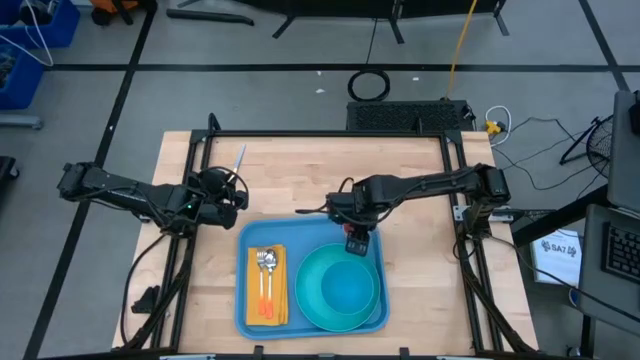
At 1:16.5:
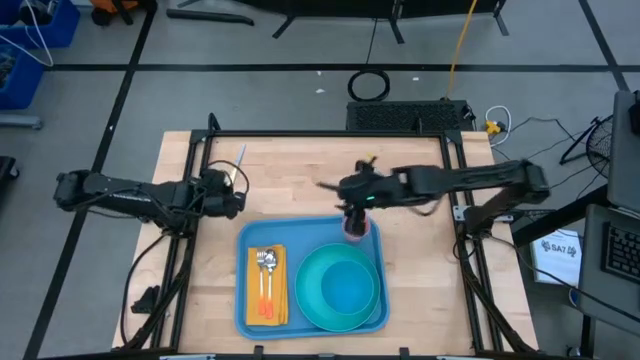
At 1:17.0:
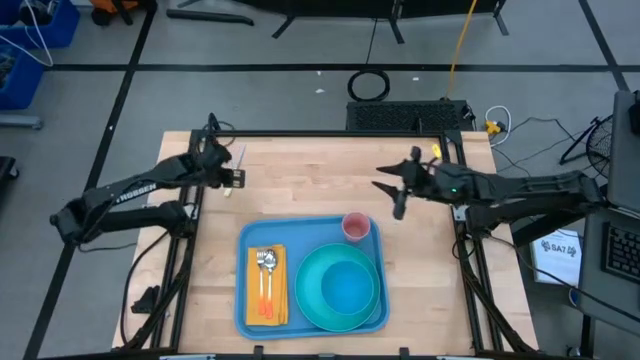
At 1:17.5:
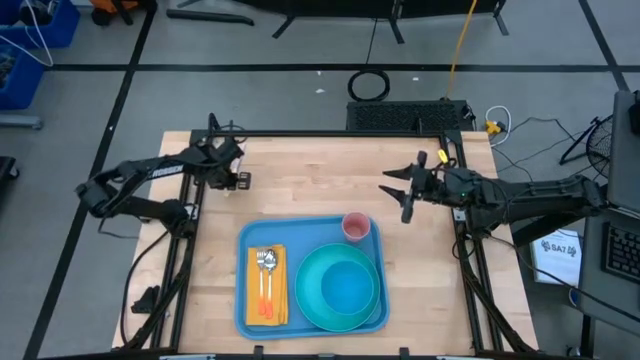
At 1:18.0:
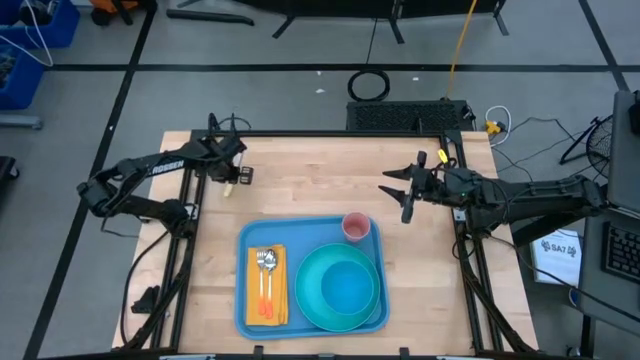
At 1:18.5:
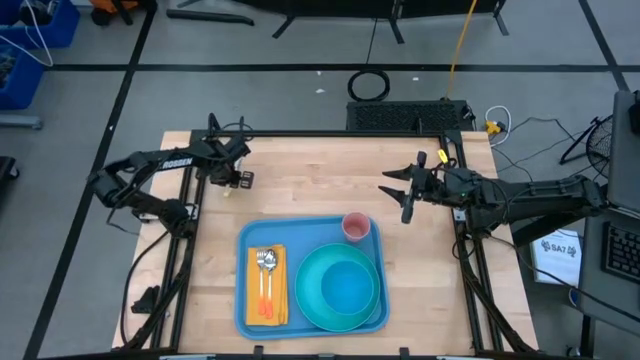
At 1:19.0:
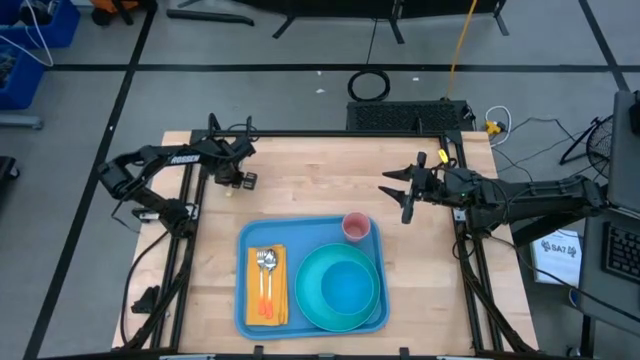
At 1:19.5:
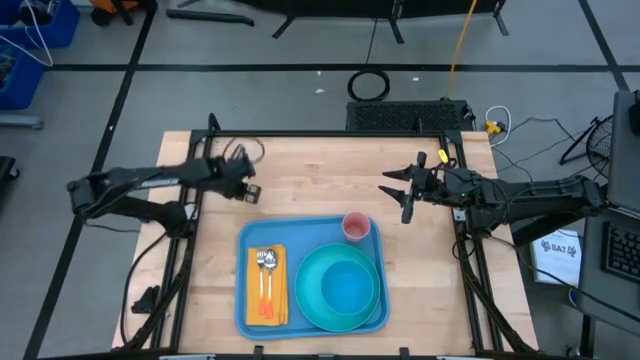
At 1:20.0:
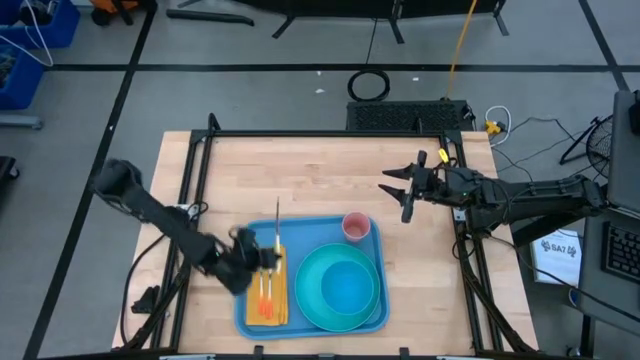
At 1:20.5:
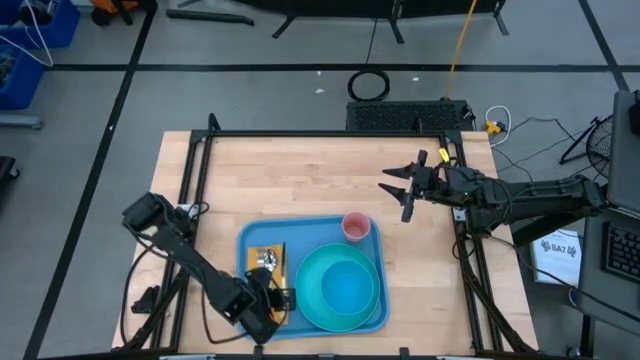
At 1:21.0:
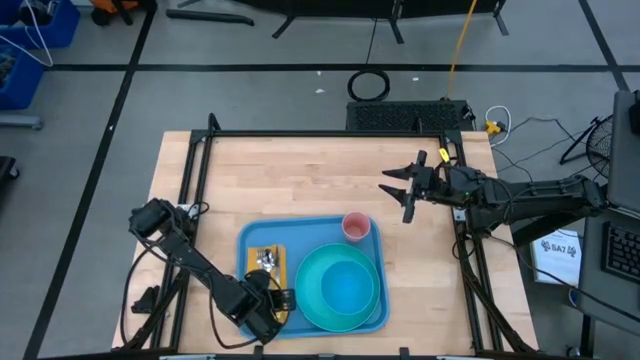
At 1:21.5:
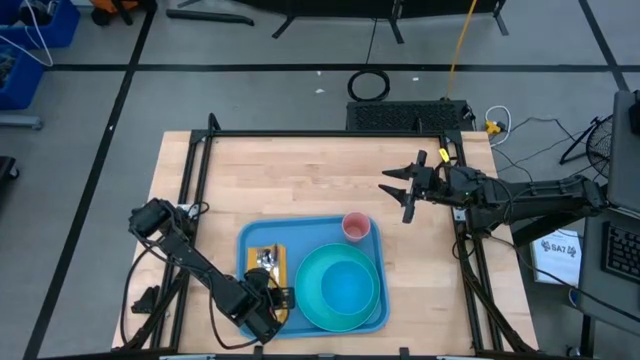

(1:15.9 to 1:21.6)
Task: Set up tray
Put the yellow knife on top of the yellow napkin to the right of the orange spoon

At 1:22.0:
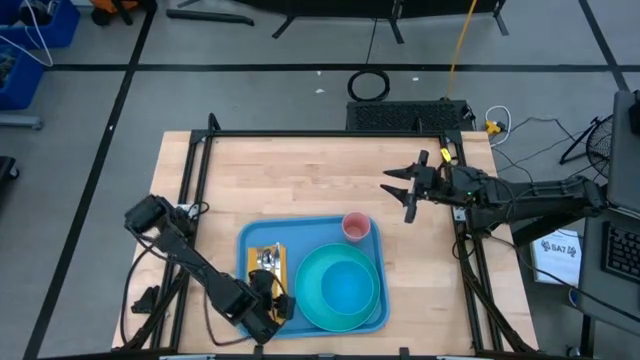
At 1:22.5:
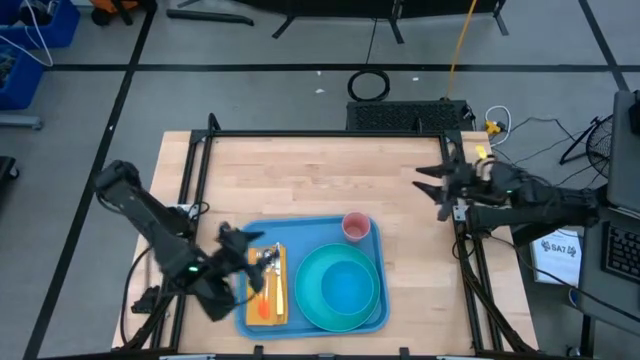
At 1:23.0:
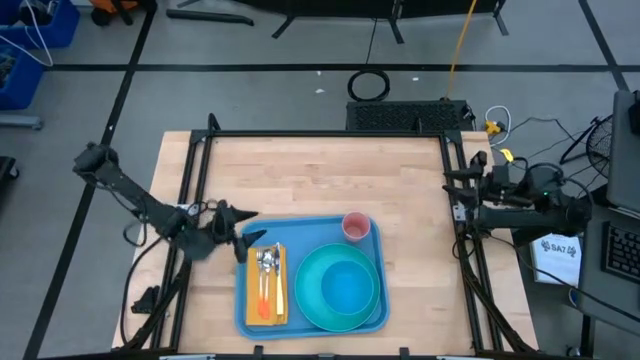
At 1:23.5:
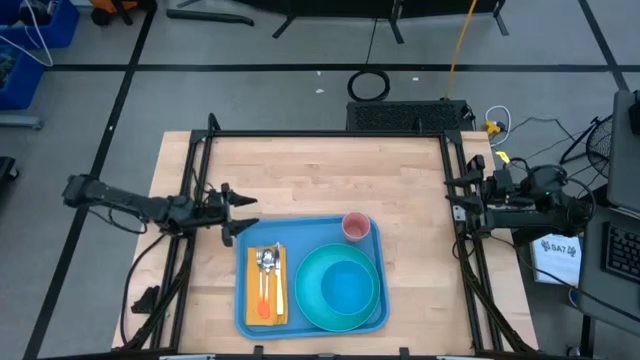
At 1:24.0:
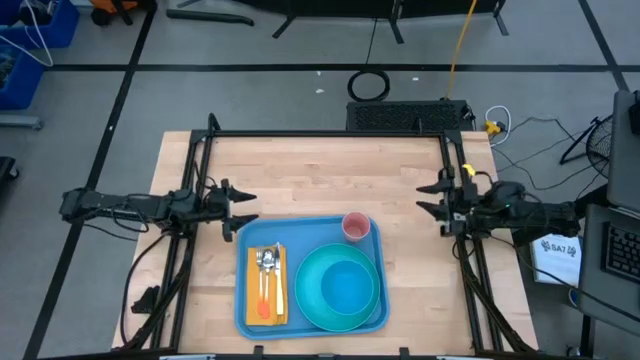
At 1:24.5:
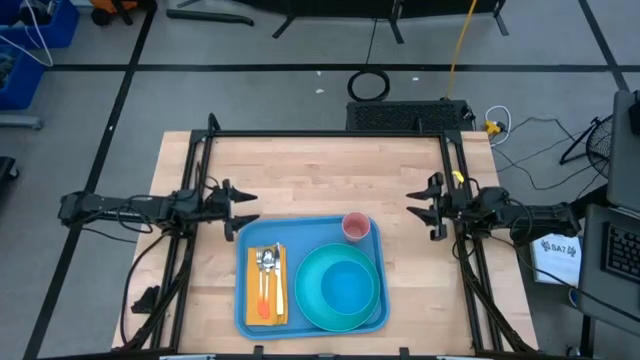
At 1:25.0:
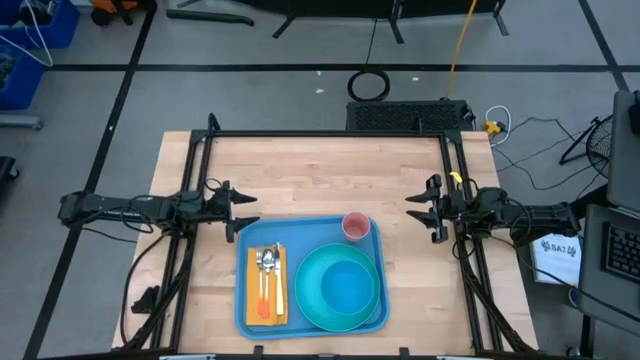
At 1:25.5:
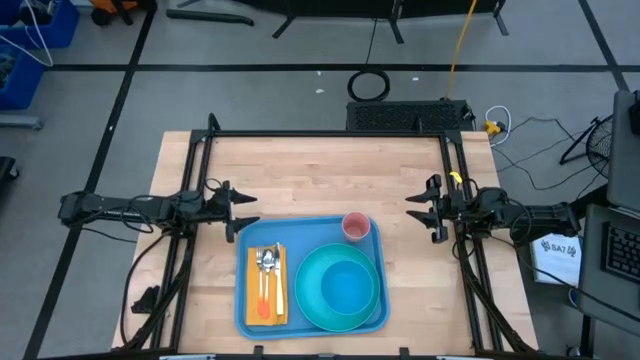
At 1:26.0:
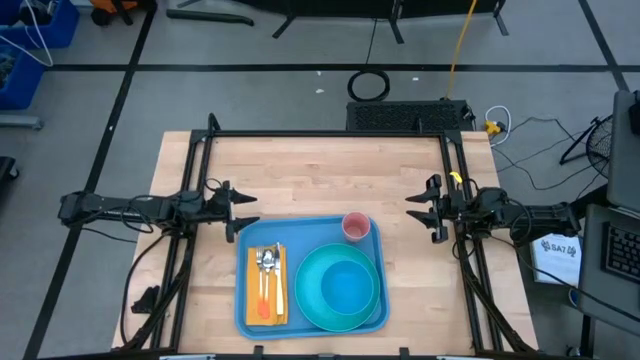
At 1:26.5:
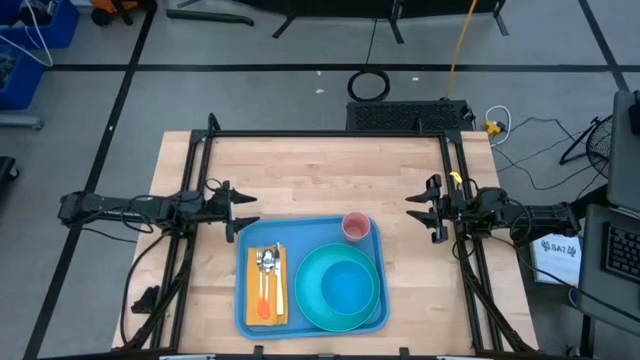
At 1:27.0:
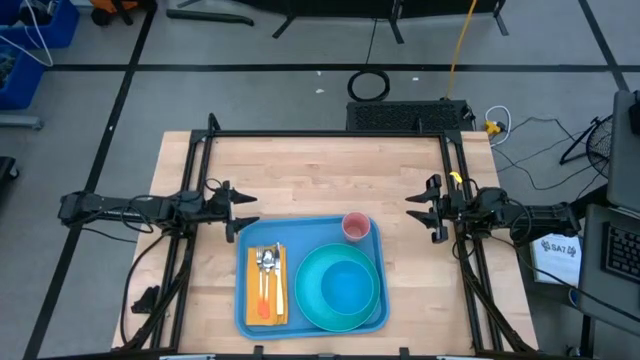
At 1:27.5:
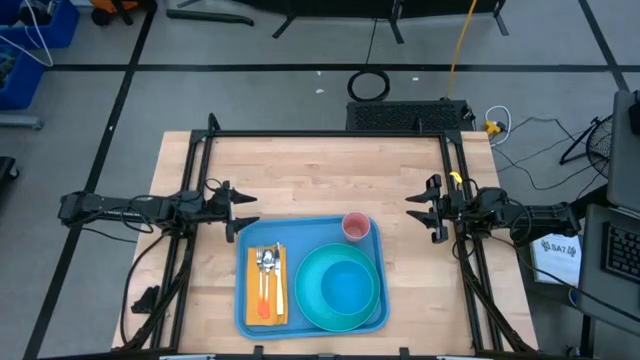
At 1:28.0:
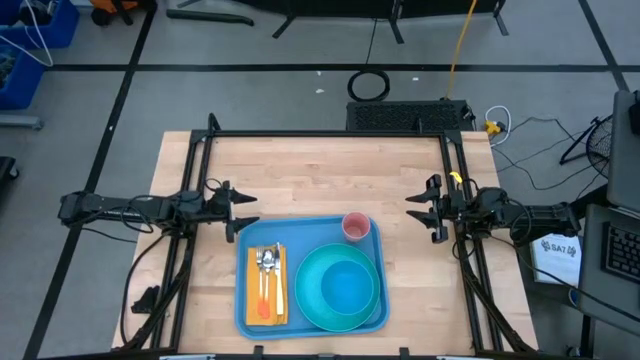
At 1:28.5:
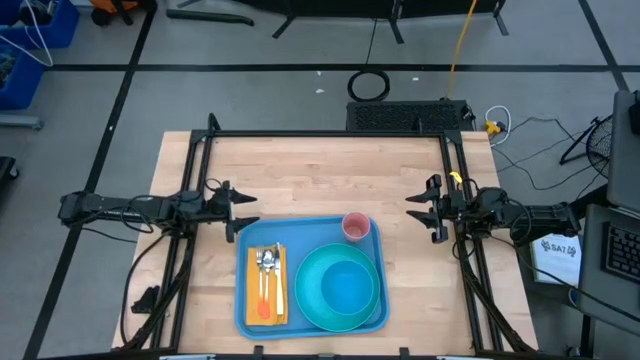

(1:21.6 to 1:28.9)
Return to Home Position

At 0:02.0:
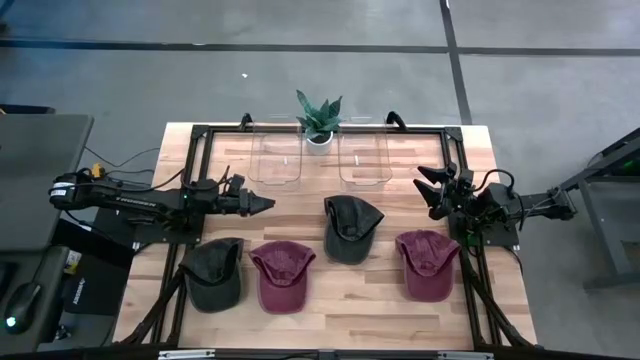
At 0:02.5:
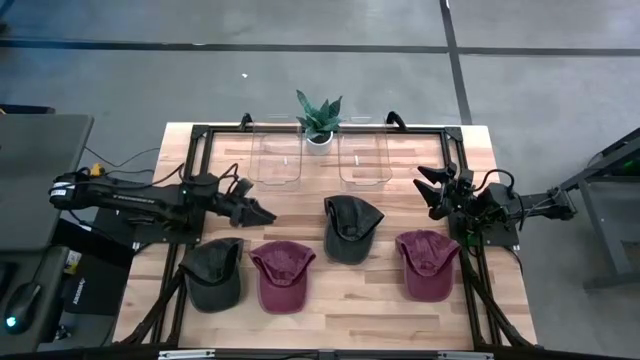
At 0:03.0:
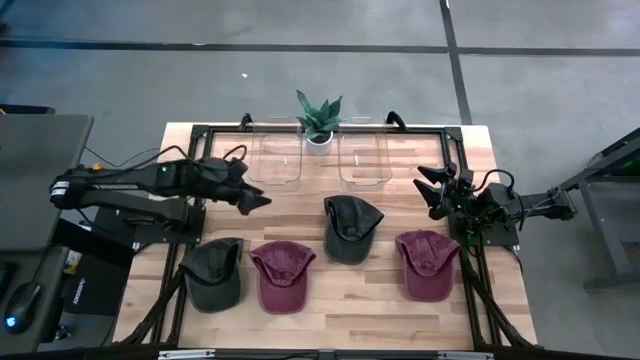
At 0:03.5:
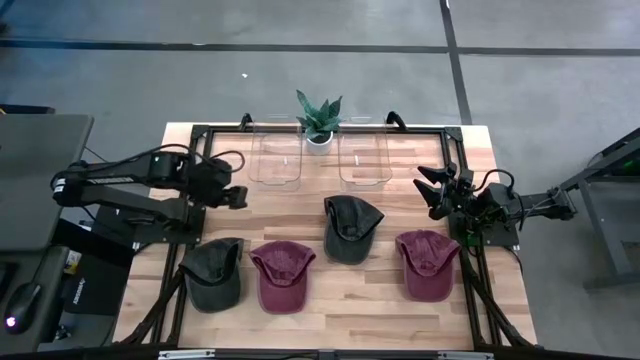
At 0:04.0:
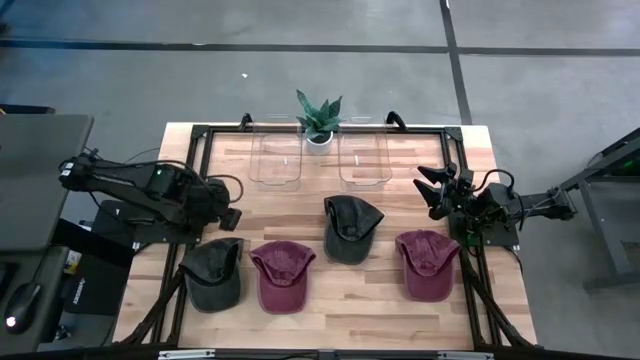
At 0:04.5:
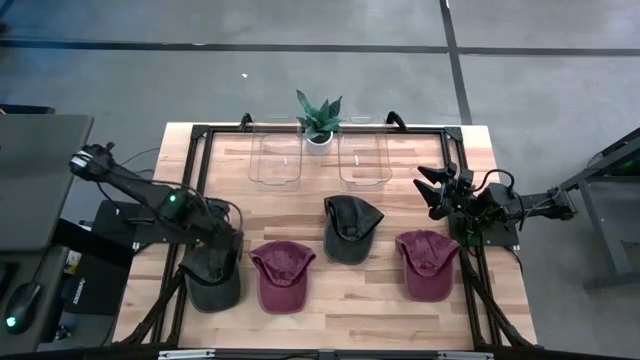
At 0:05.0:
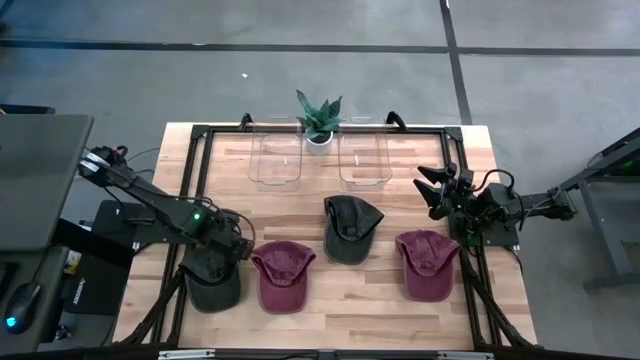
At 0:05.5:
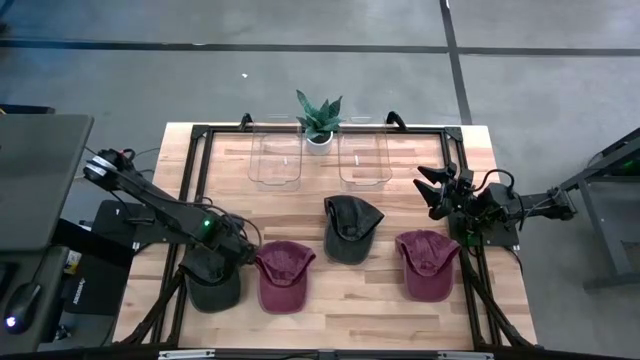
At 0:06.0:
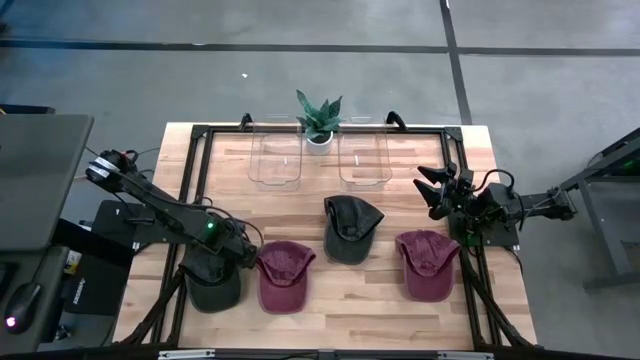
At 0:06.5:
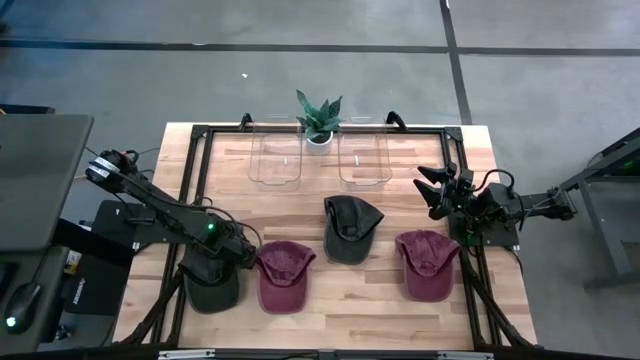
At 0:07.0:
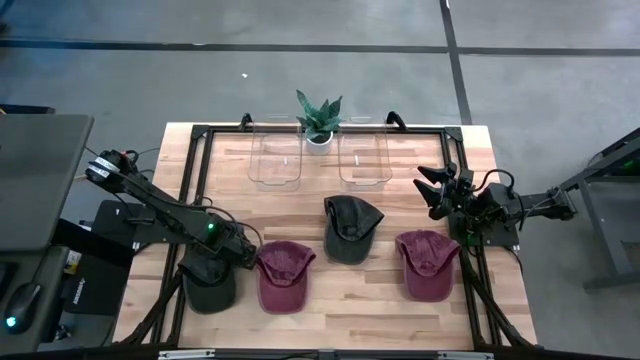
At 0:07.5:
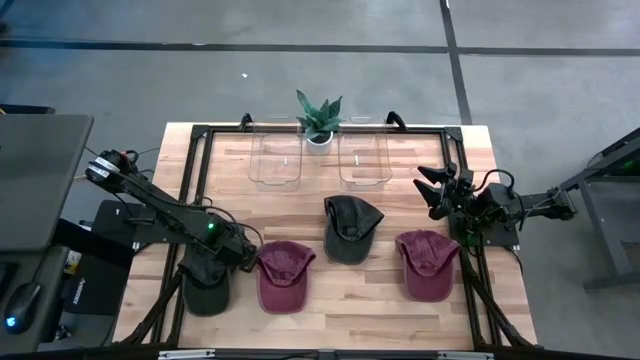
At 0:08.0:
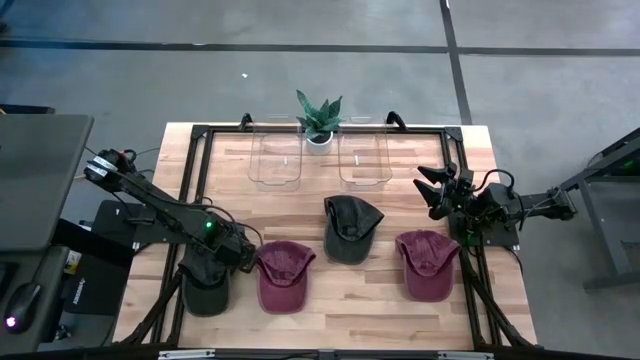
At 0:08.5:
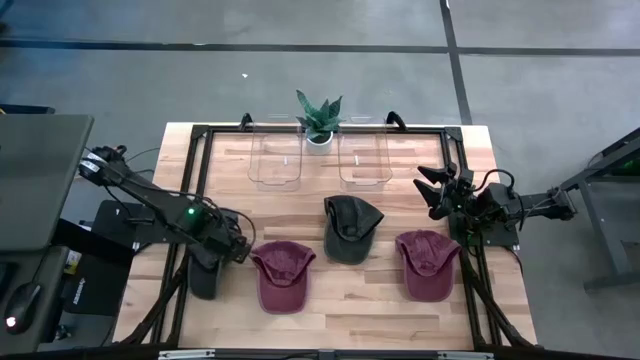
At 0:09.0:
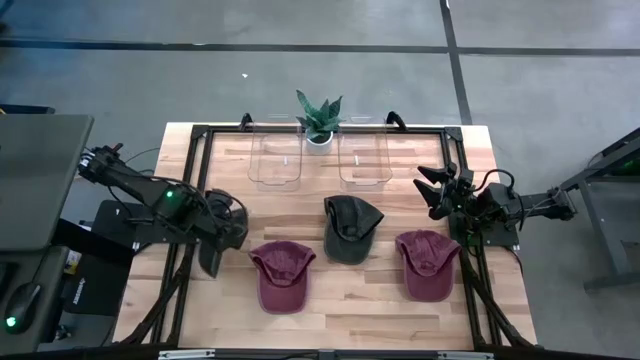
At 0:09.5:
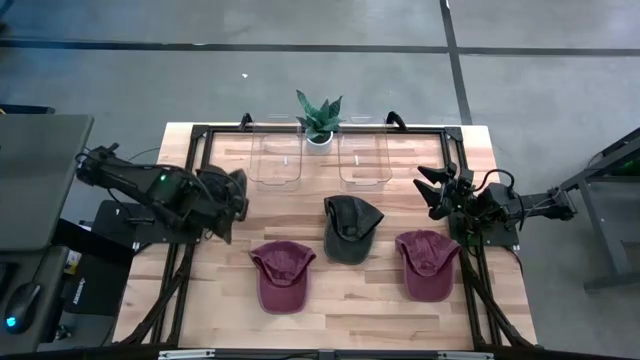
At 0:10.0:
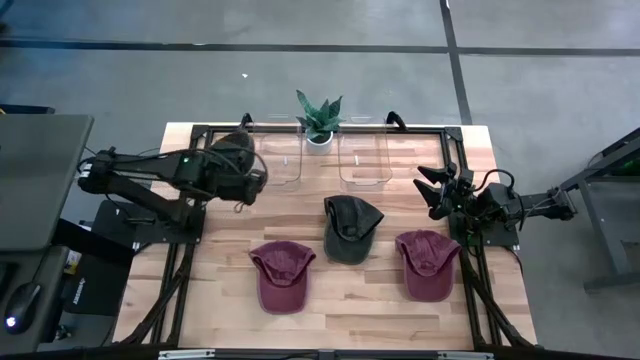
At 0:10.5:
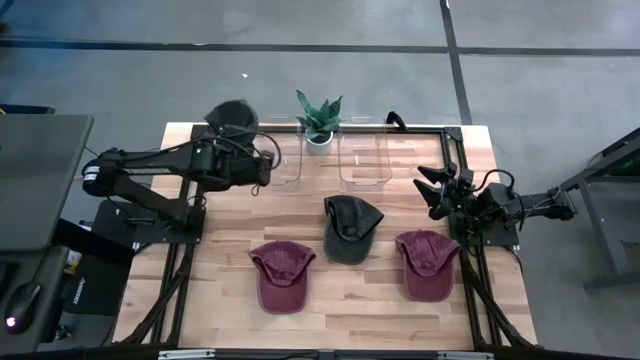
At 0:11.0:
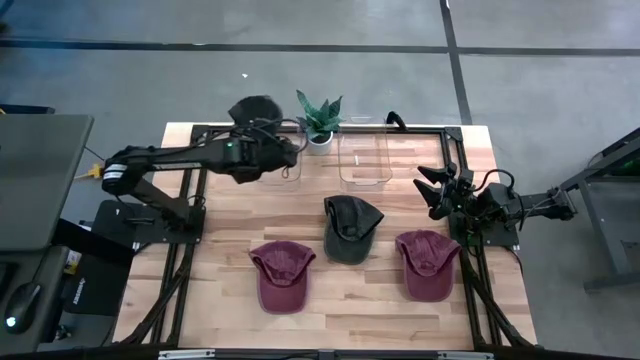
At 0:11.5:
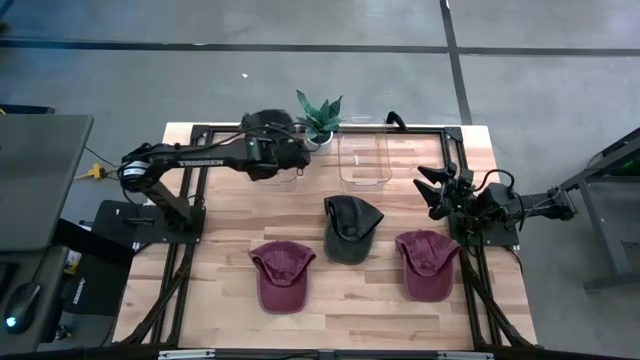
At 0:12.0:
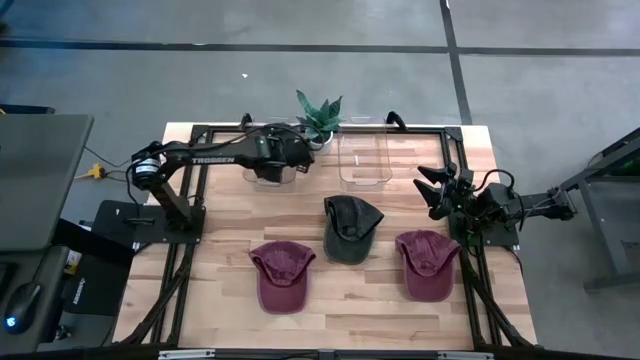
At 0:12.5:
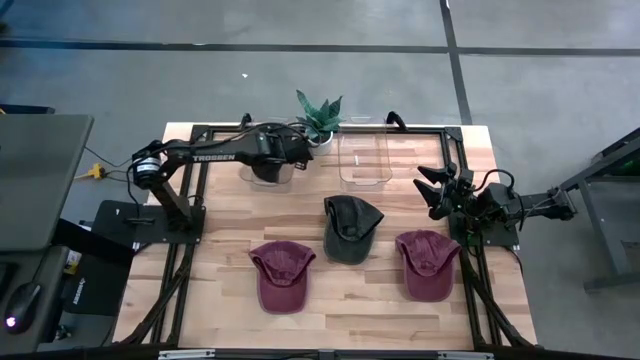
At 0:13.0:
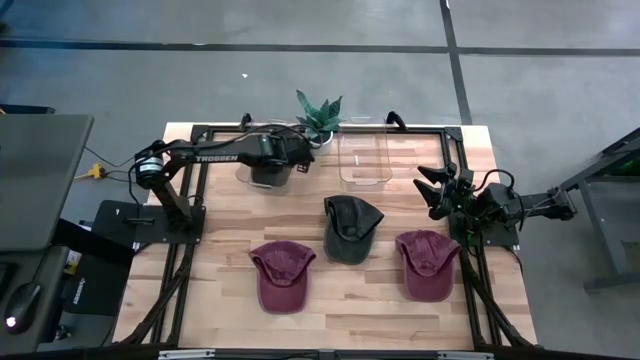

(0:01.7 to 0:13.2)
Task: Pick & Place hat
Put the bottom black cap into the left transparent bin
